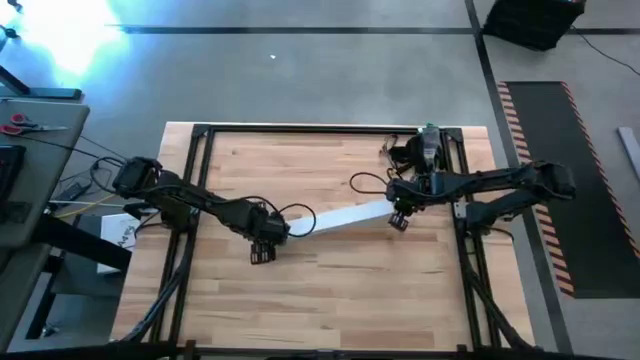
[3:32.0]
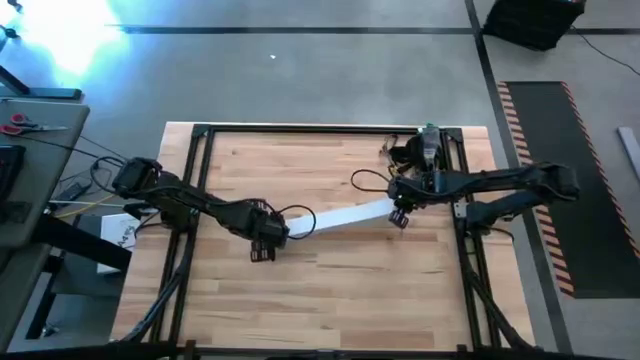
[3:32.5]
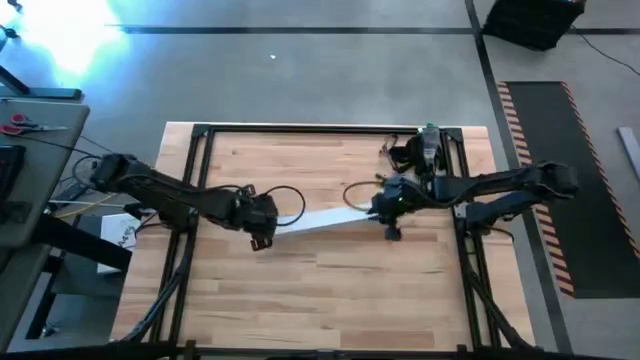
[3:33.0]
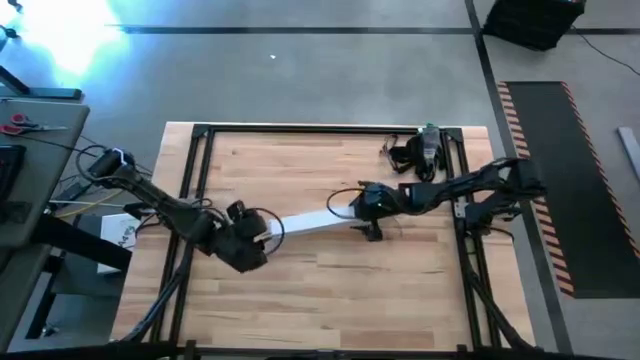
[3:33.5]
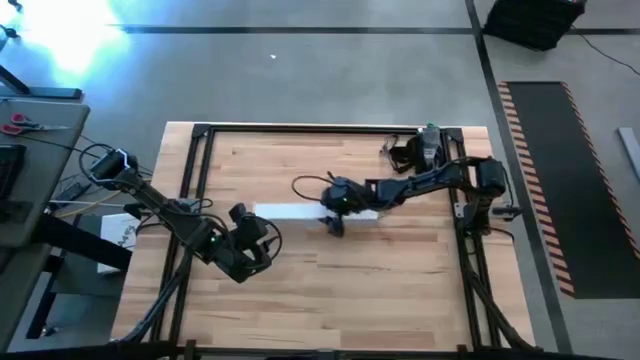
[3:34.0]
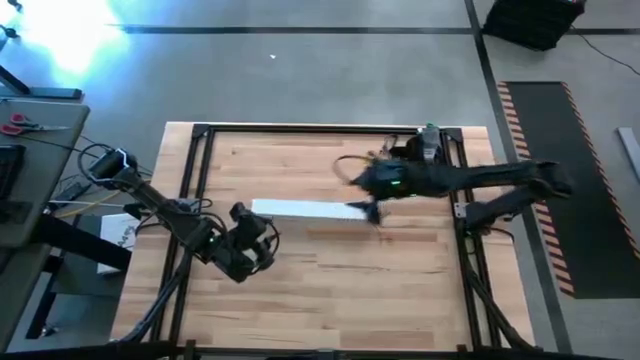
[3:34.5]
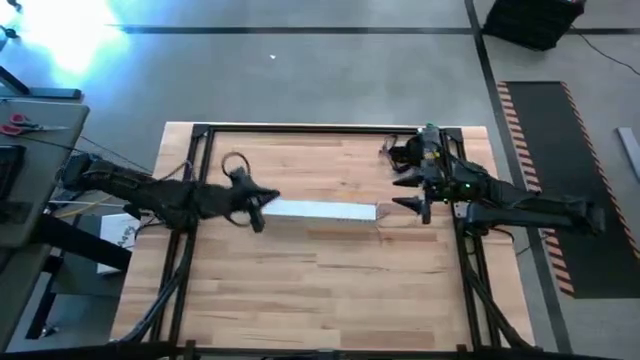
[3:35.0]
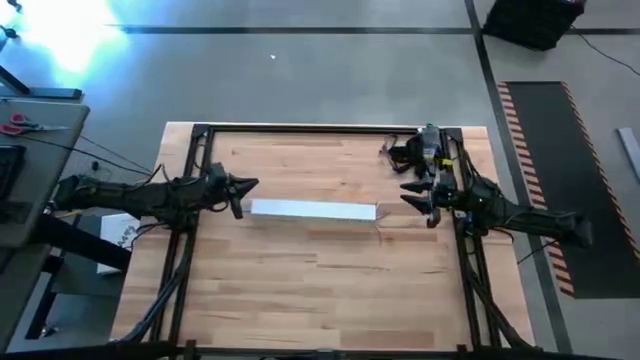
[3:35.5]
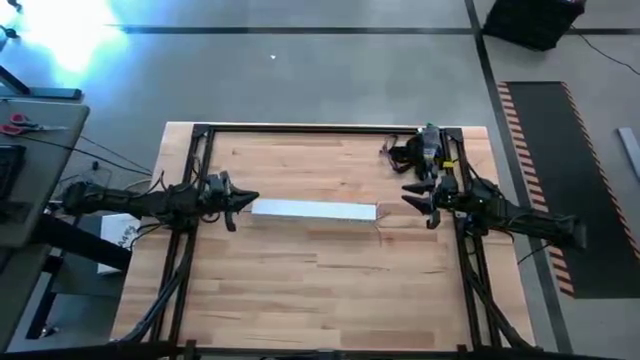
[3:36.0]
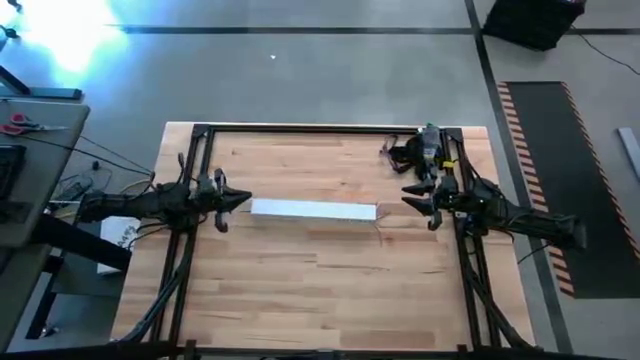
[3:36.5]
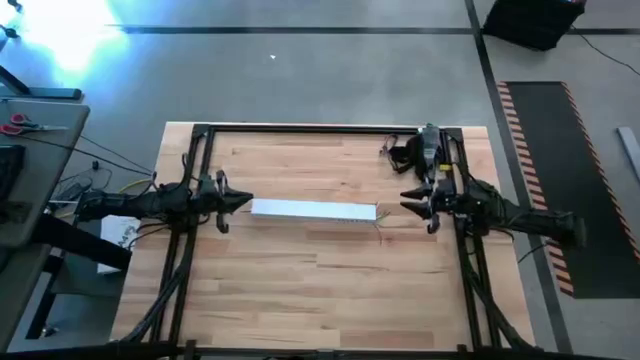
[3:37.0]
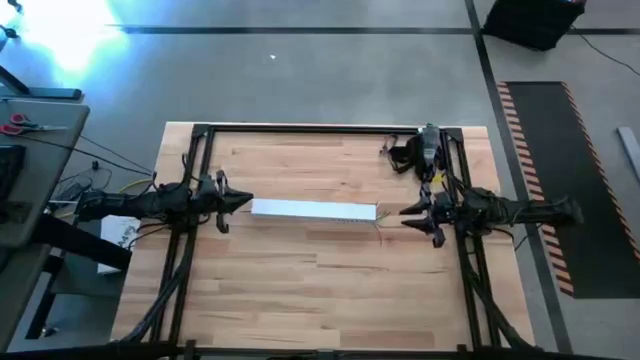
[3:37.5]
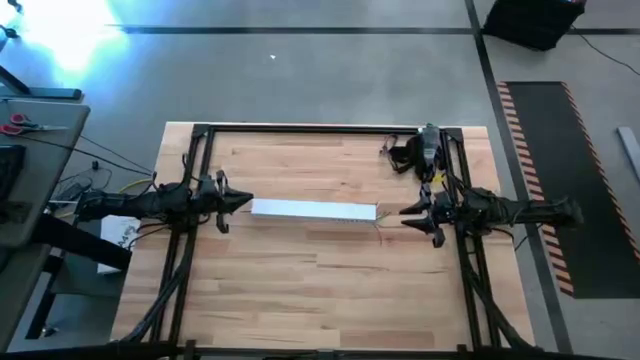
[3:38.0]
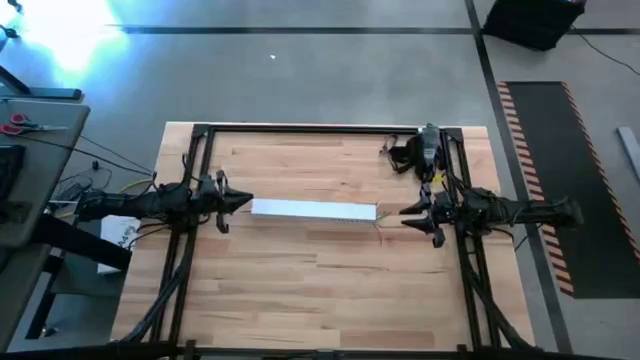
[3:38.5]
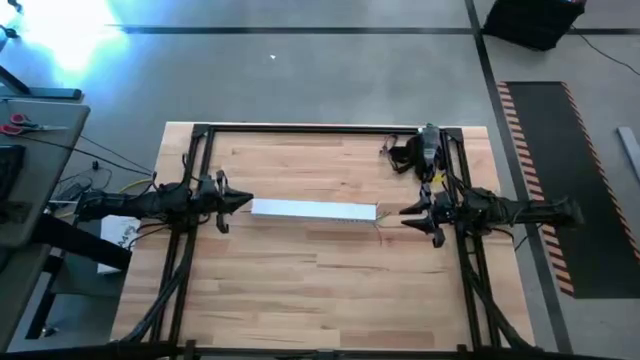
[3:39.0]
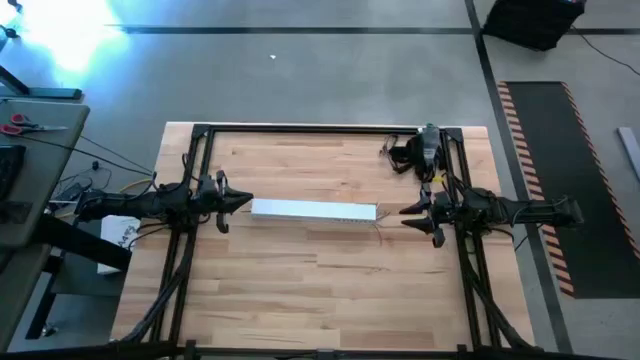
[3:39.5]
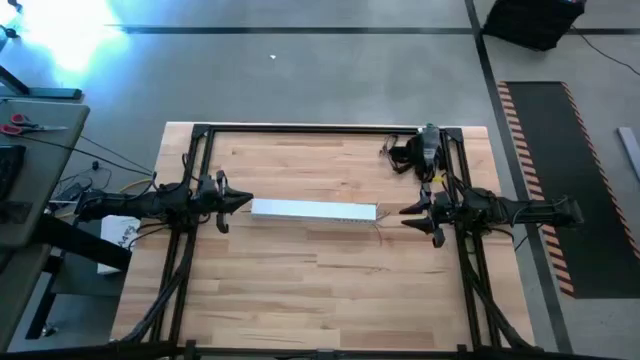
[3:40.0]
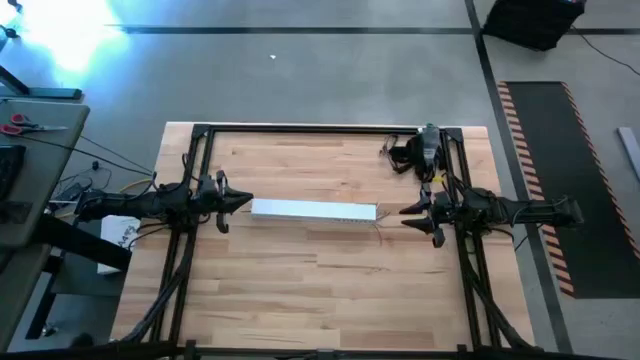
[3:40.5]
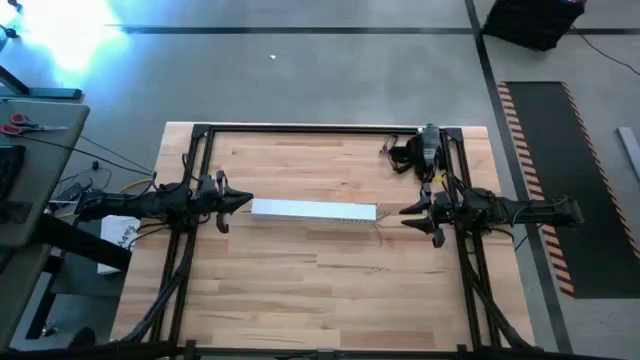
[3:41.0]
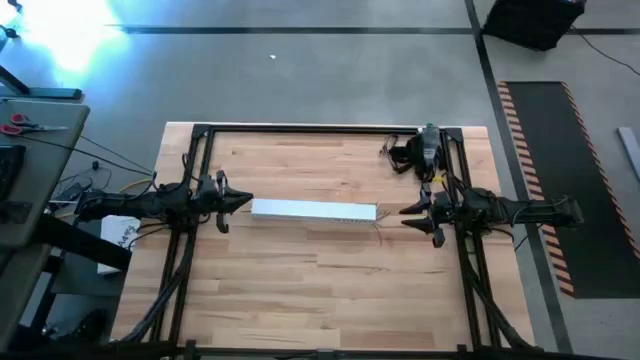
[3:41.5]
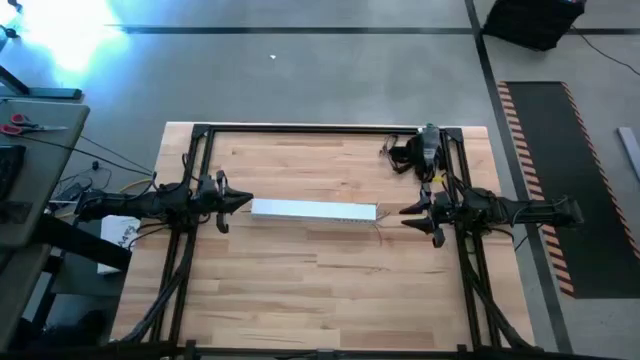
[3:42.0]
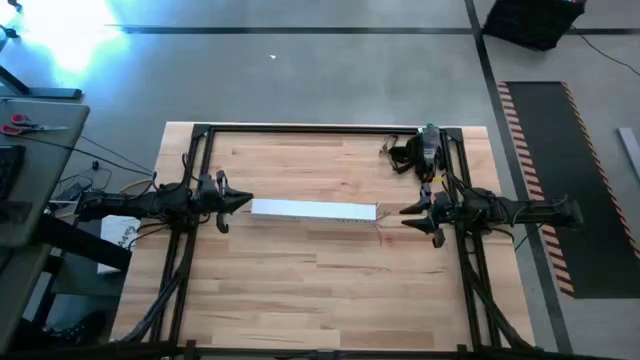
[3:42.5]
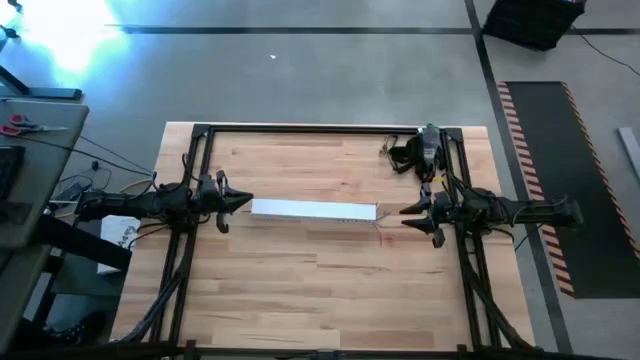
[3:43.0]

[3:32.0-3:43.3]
Task: Ziptie cables
Return to Home Position

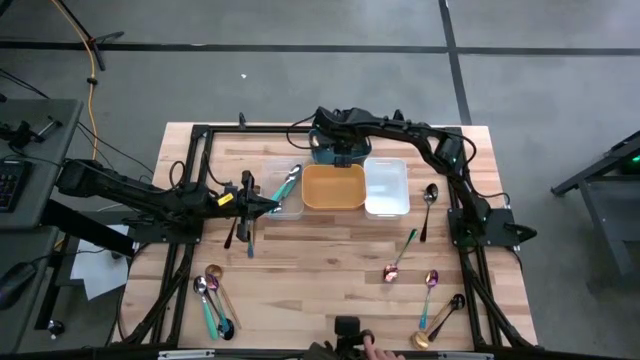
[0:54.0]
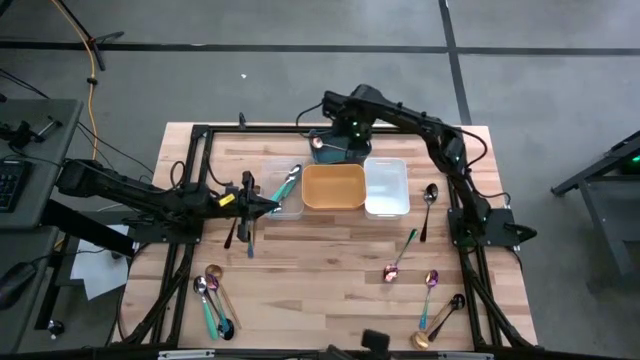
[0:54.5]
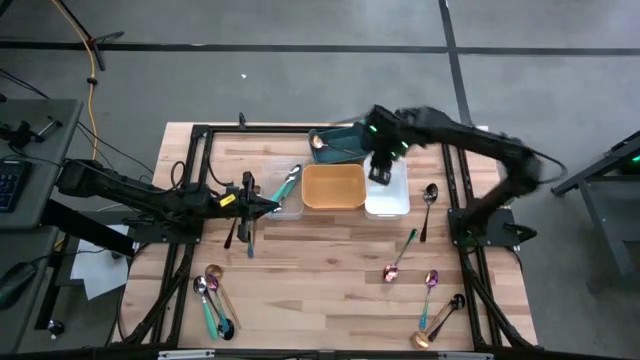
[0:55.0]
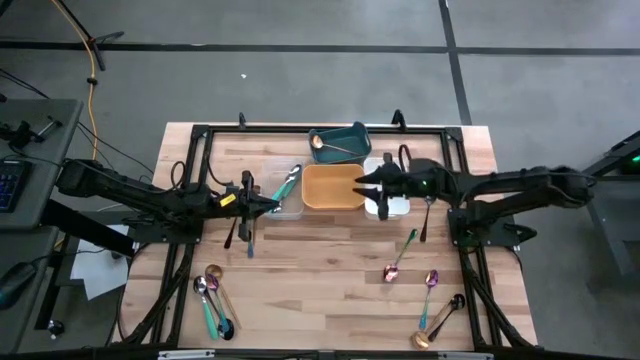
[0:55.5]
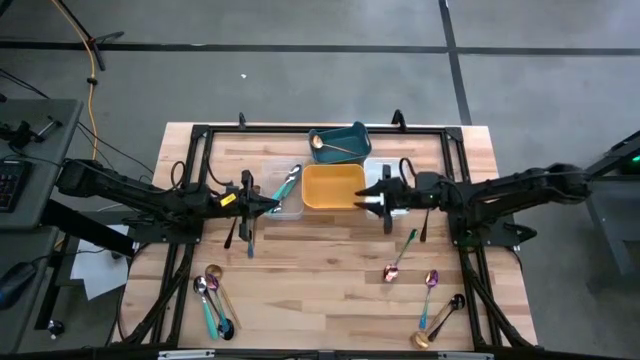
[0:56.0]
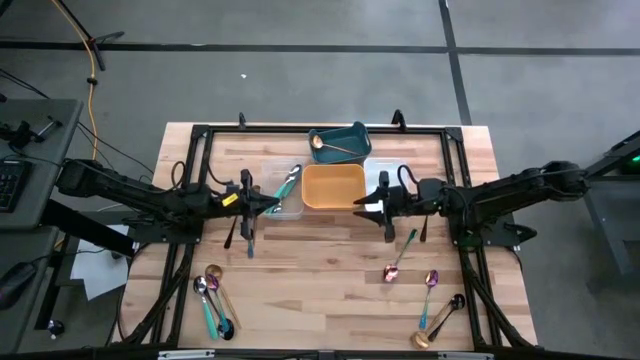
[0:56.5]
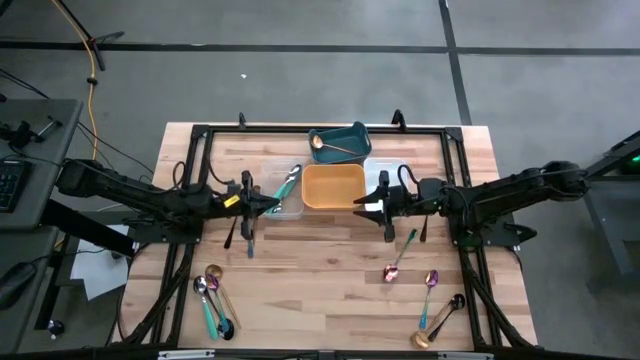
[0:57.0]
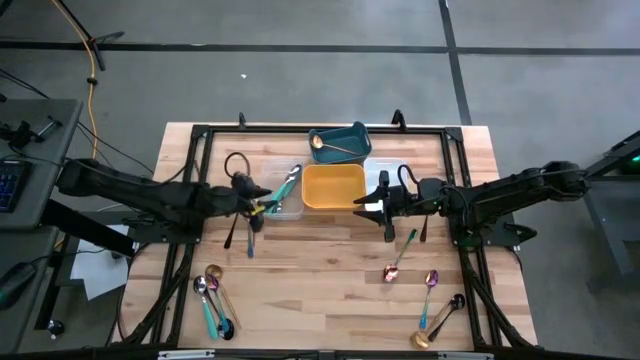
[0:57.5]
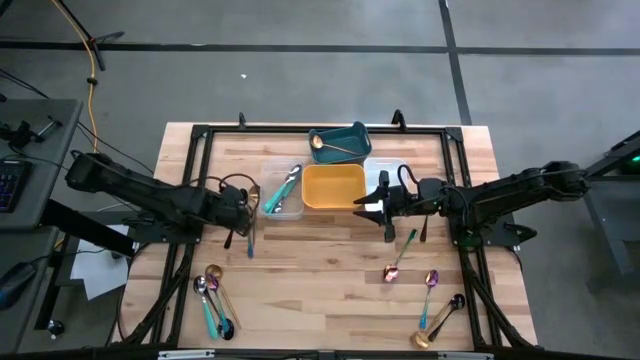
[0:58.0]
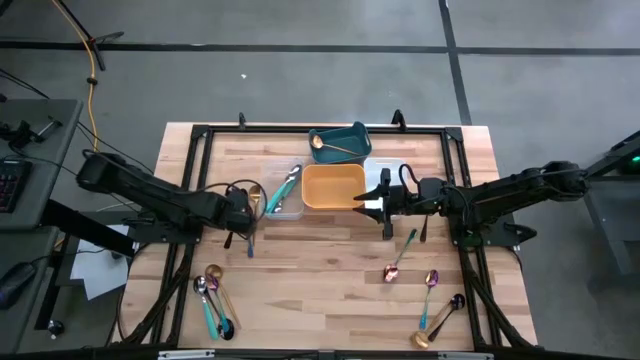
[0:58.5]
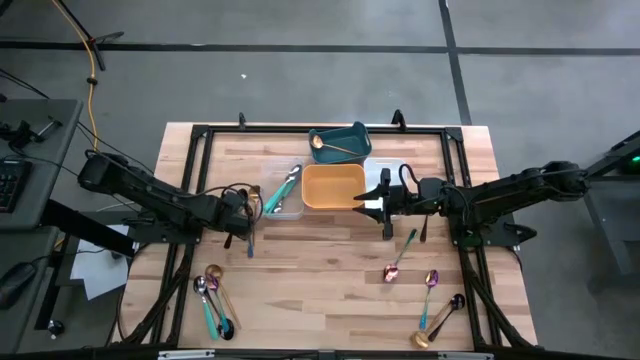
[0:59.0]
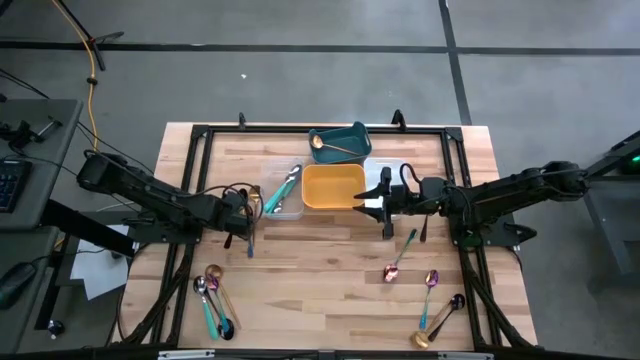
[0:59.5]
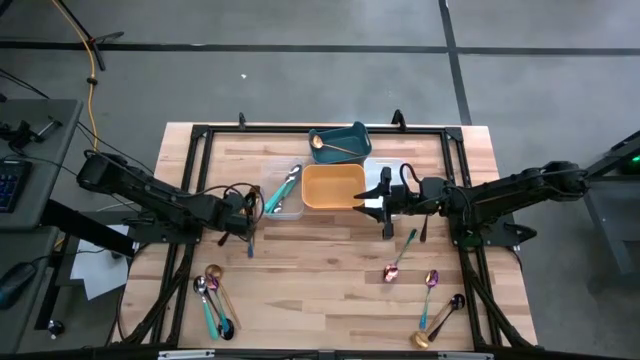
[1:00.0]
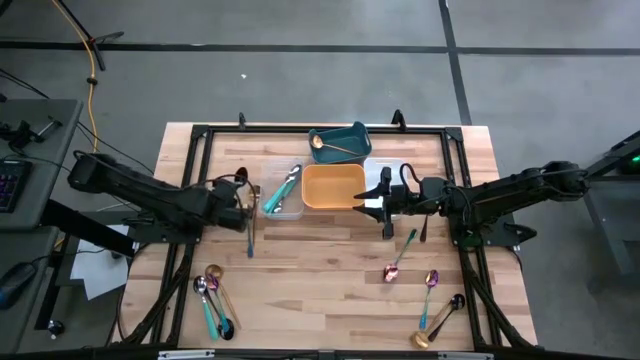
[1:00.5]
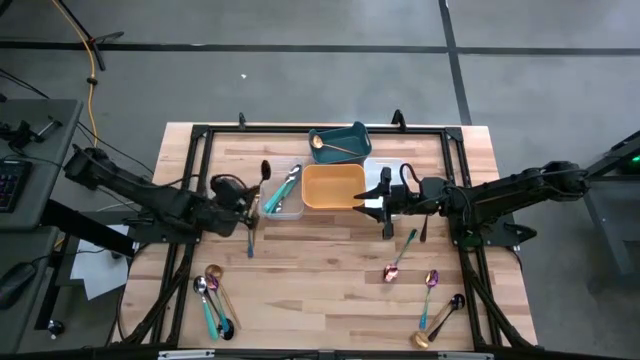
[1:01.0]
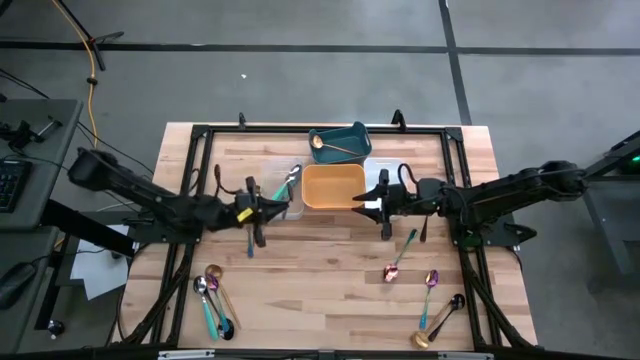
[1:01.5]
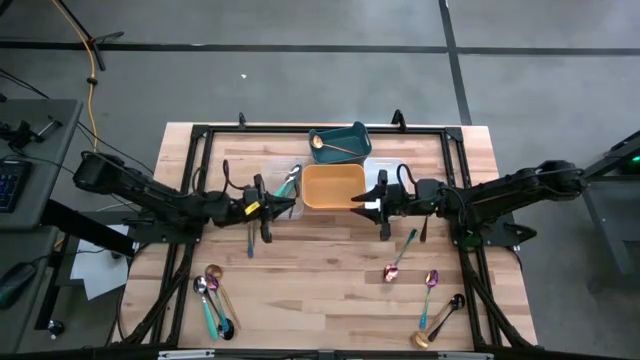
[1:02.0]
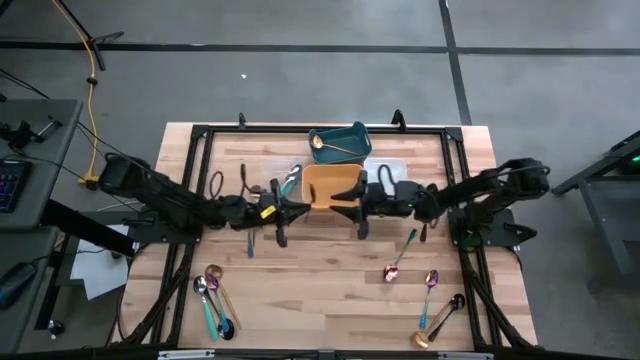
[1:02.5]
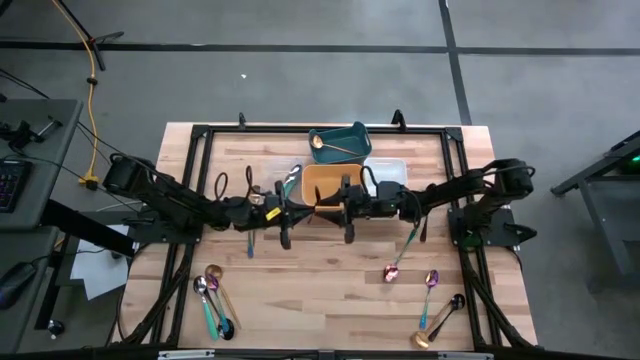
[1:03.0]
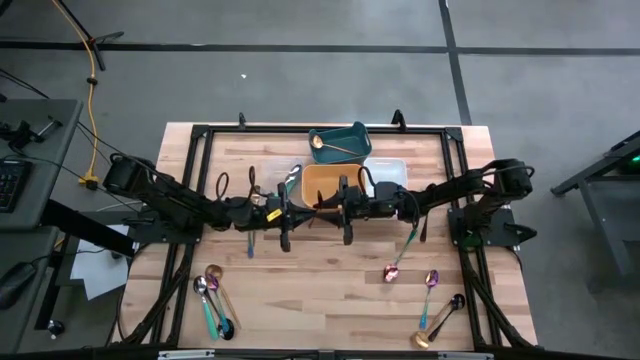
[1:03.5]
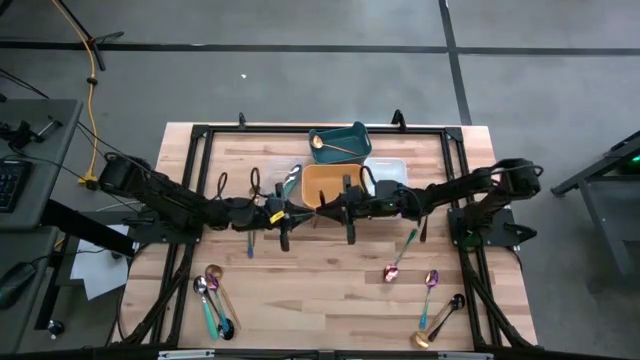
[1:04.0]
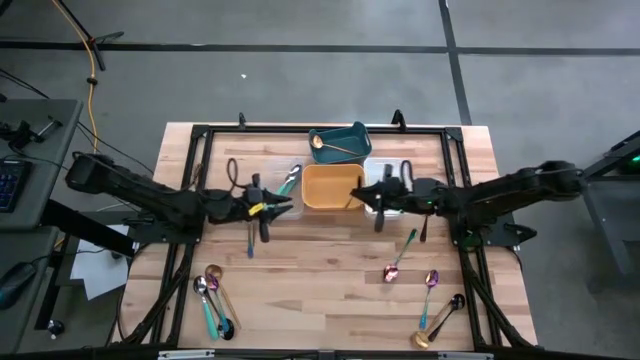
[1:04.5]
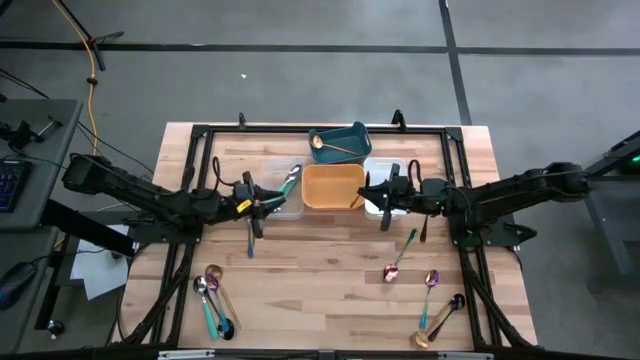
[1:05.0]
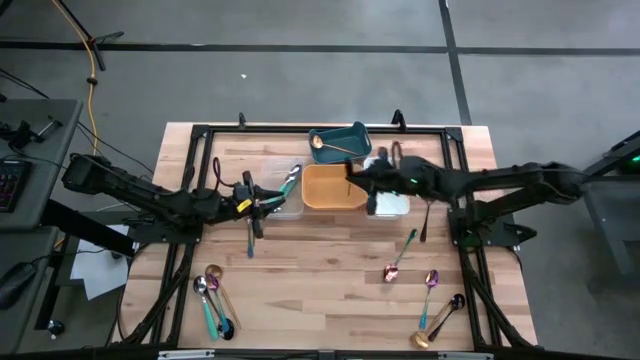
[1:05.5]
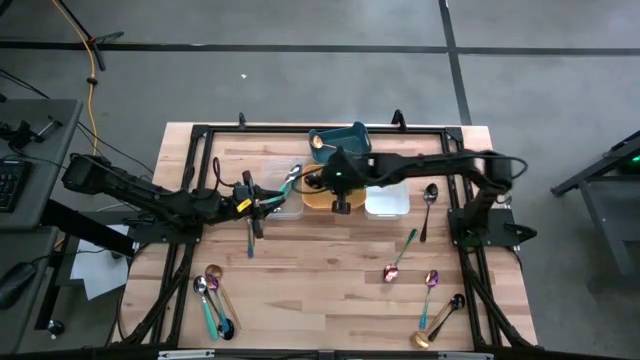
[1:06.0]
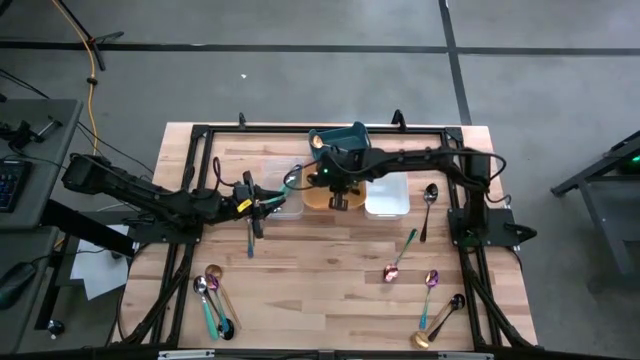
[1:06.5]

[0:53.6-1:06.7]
Task: Sort silverware by color (type)
Put the silver spoon in the orange bin
